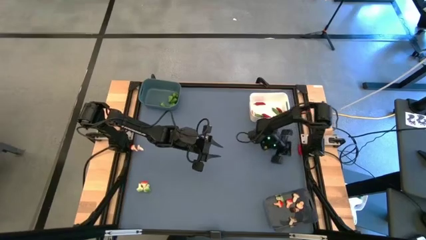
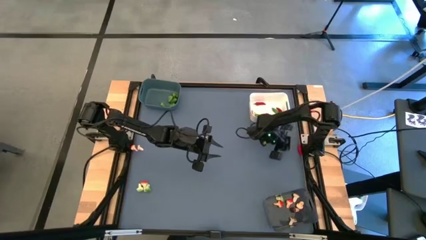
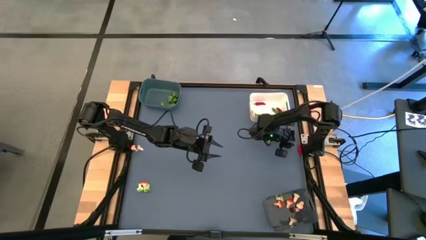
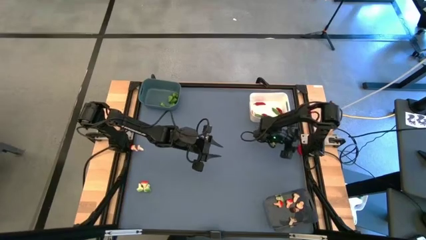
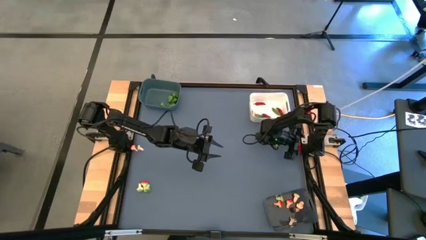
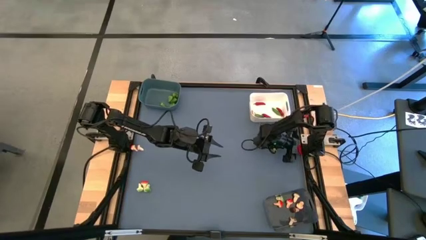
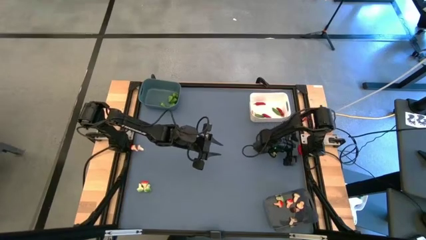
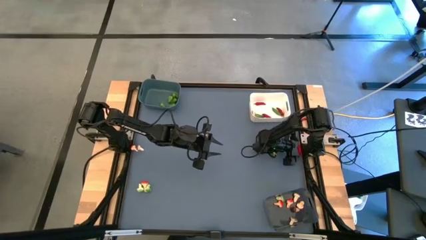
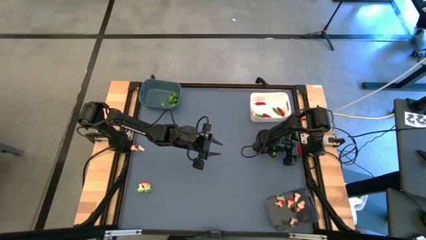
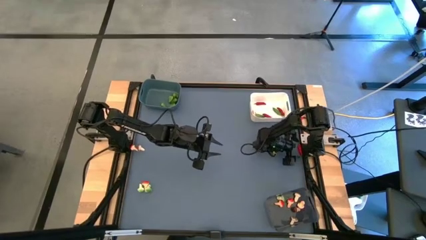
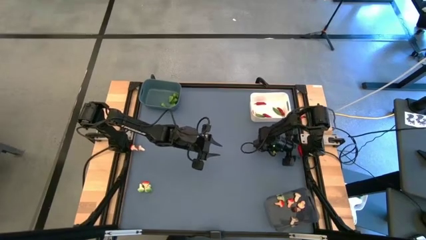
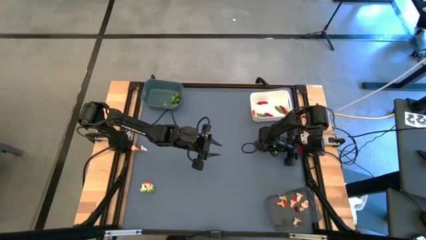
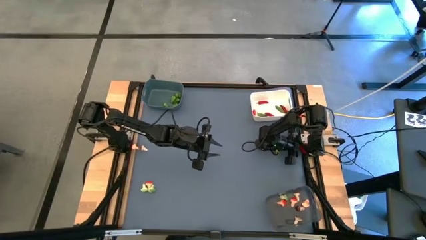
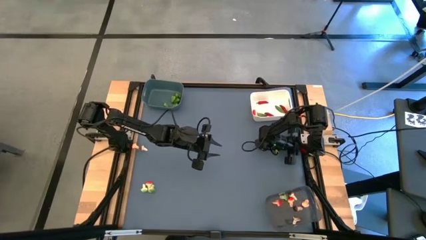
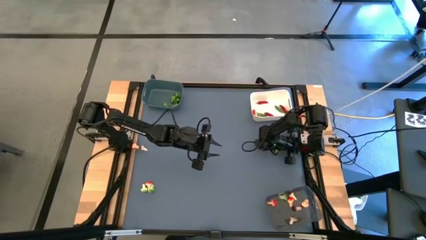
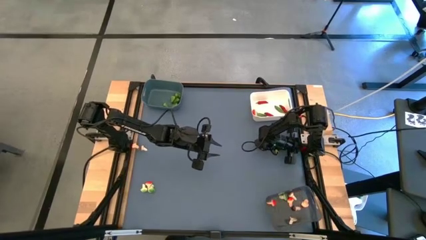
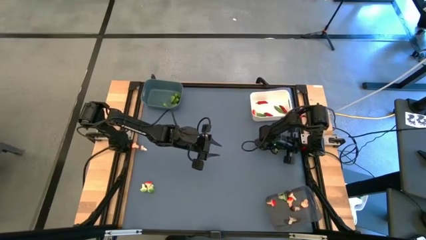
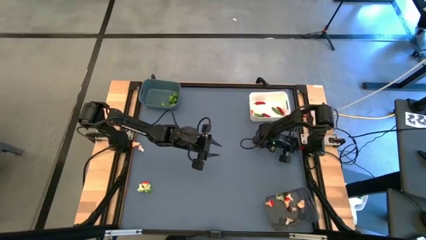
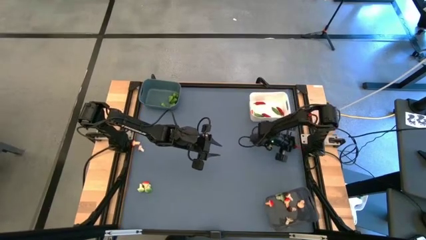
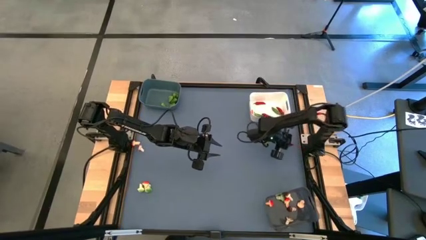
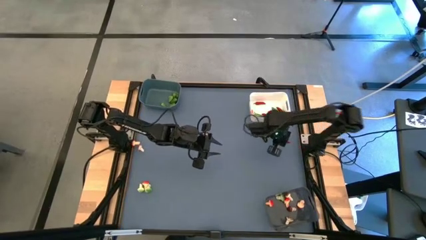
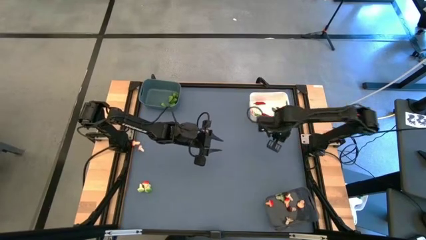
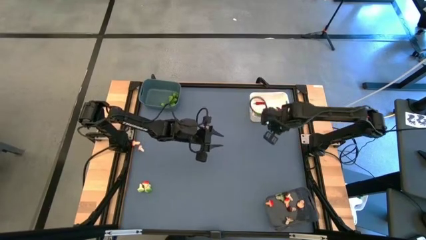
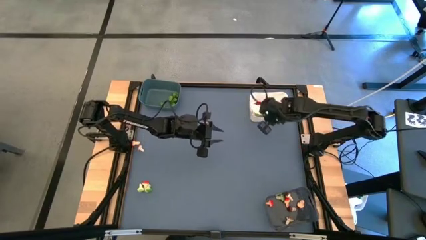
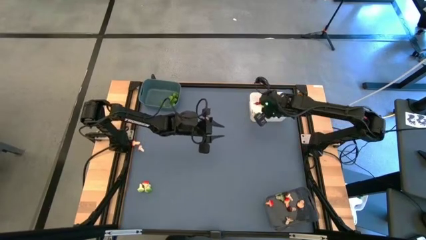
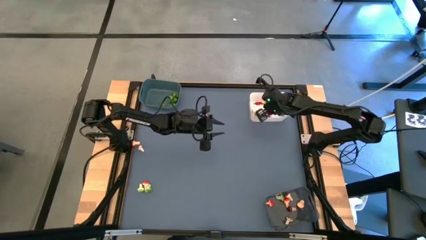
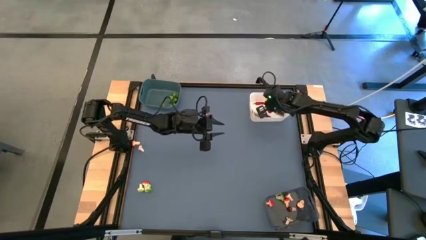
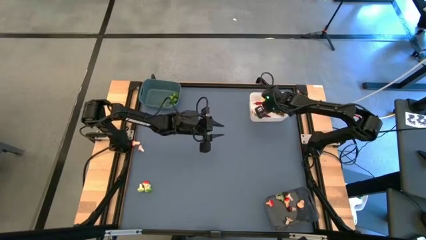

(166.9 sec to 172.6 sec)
Task: Sort produce into baskets
Put the red chili pepper into the white bin

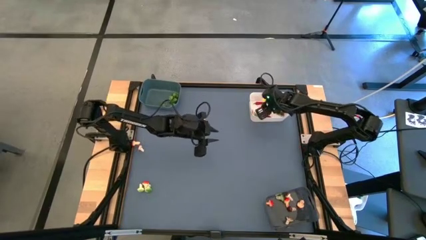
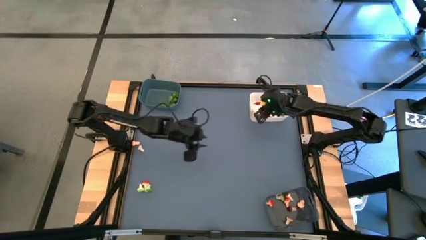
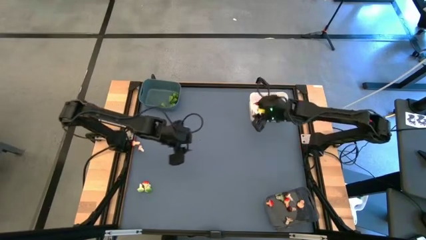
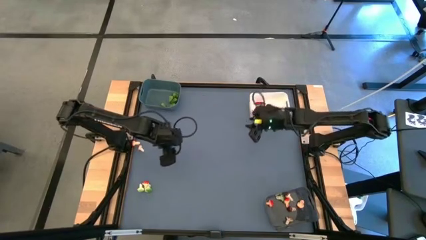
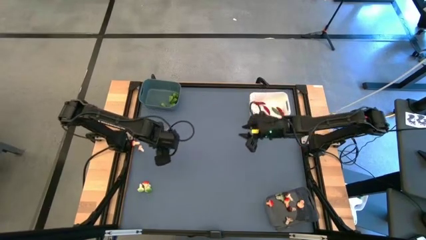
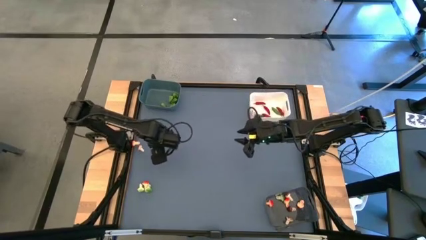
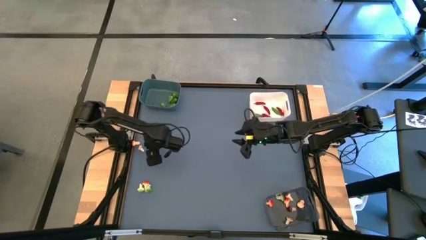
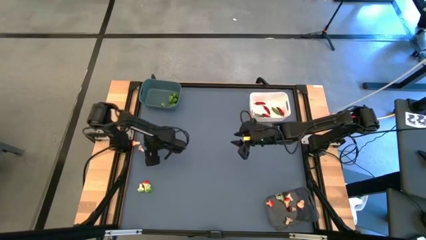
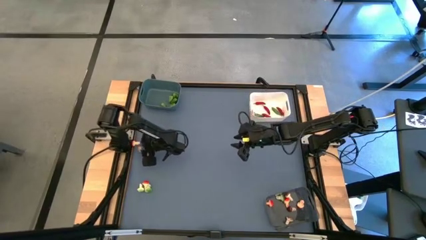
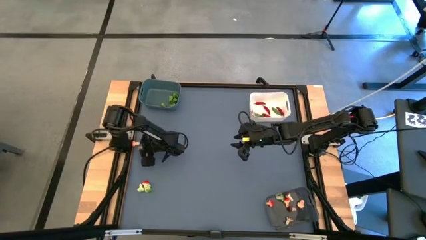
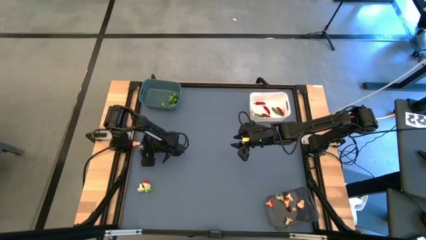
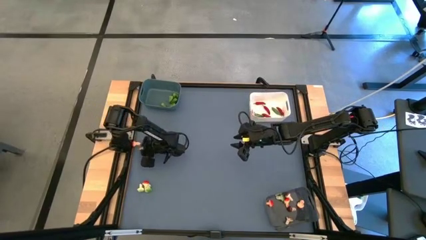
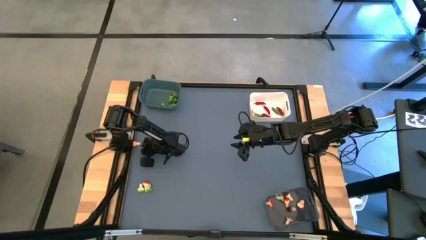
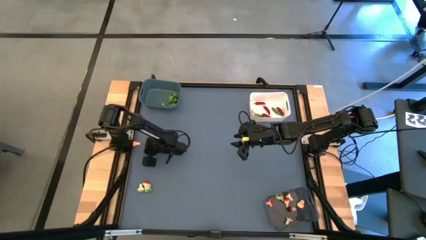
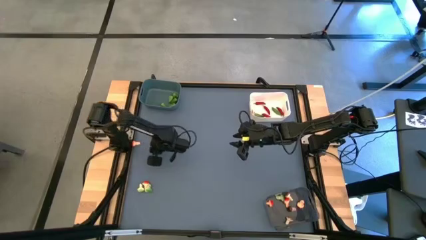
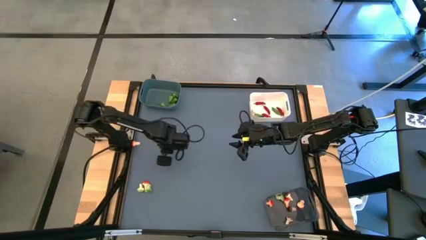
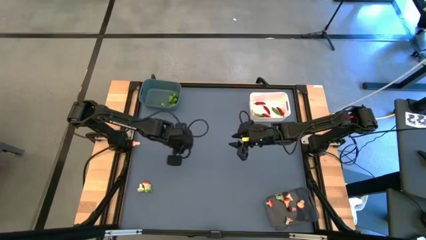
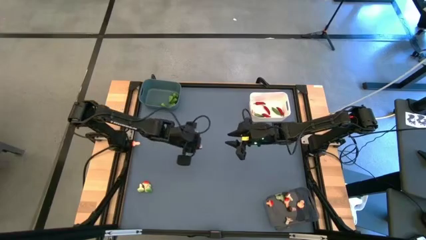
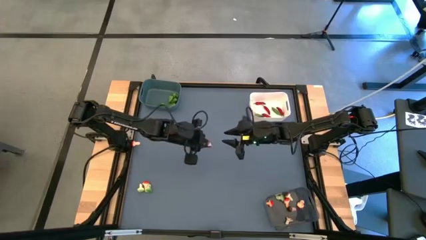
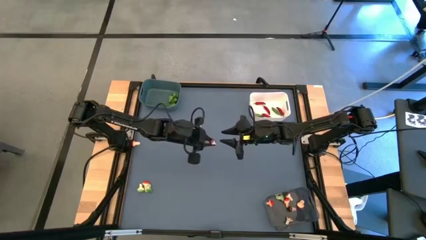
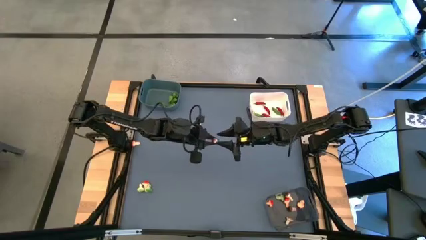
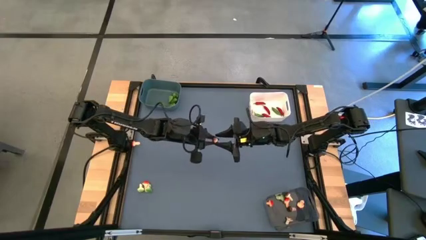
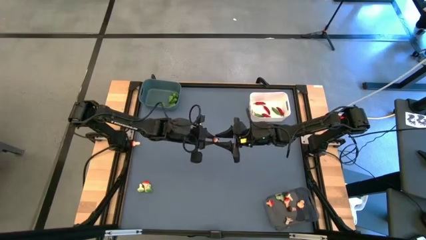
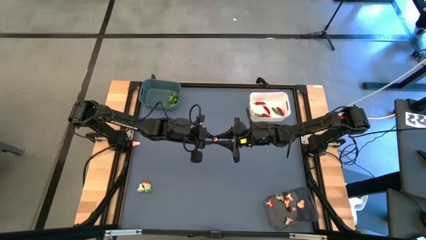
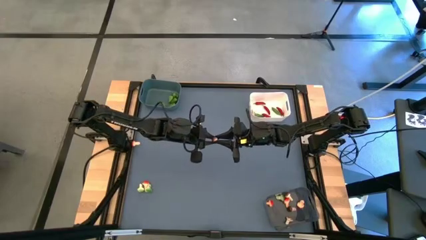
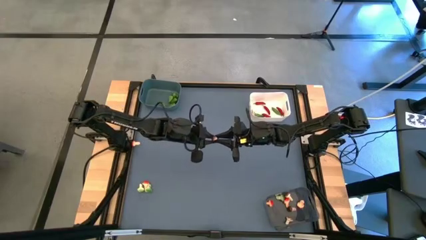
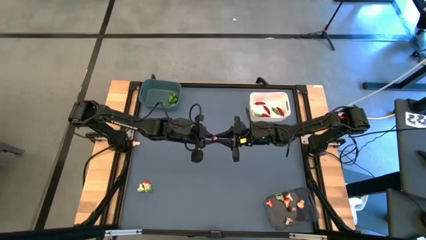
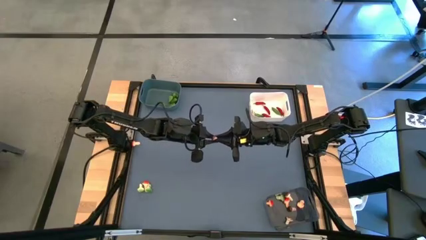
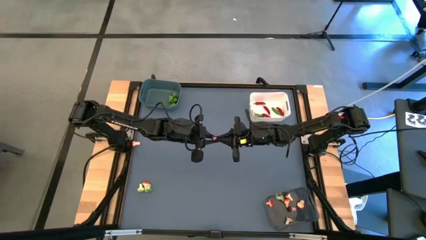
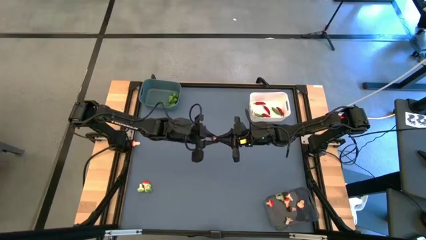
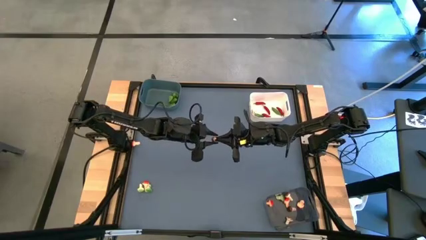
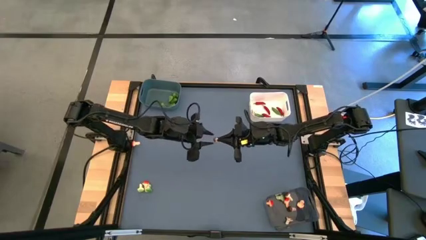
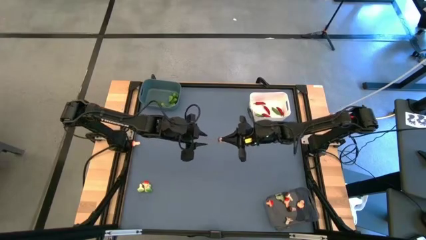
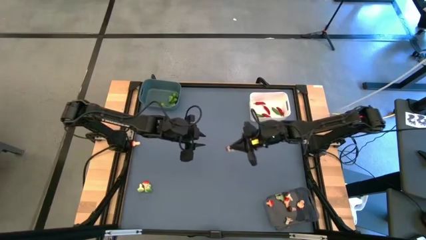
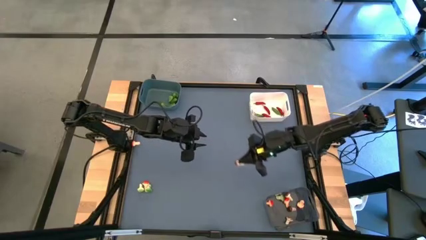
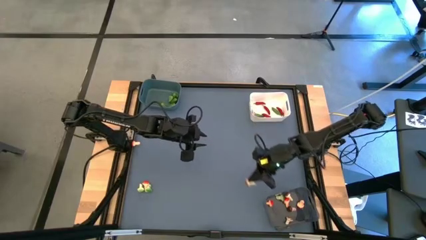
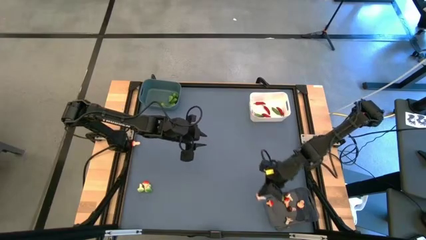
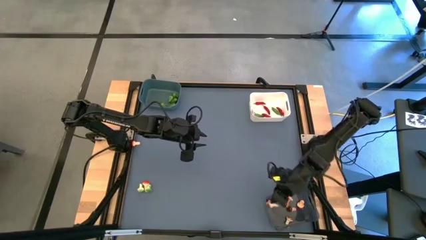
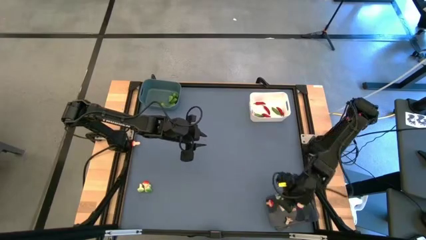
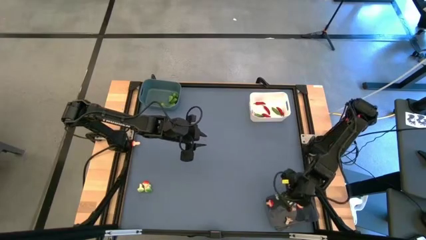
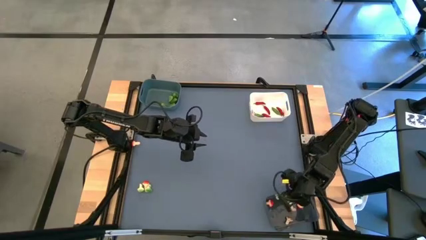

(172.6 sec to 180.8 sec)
Put the brown mushroom into the black bin

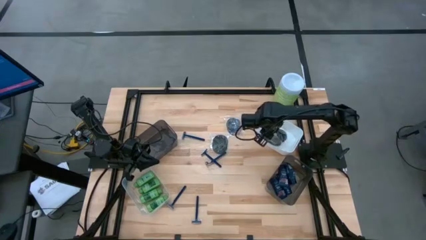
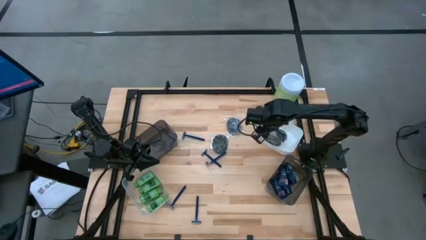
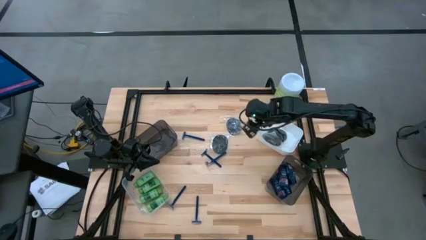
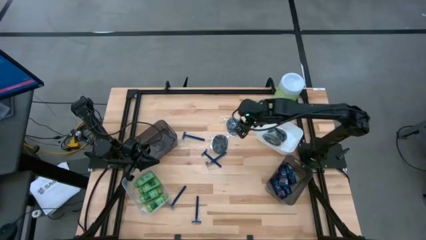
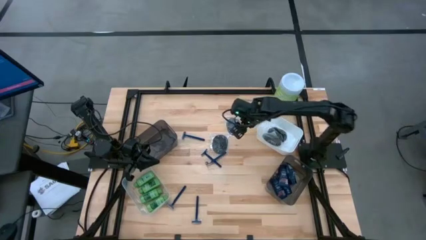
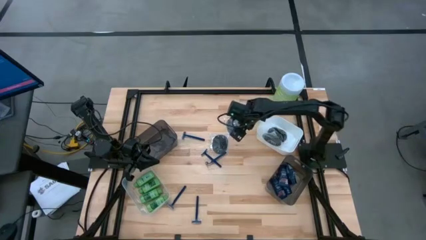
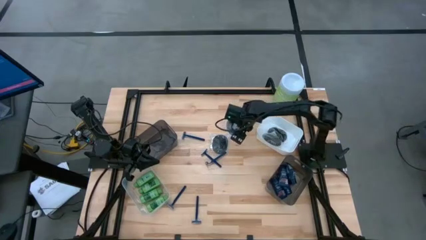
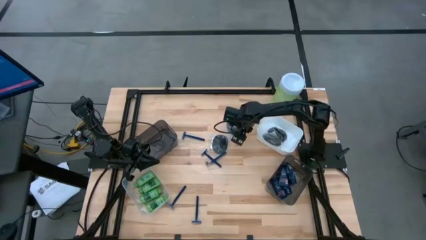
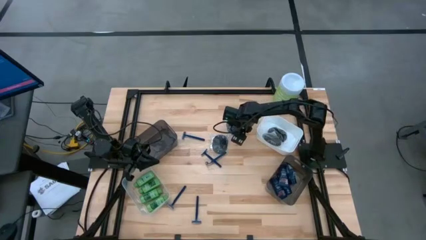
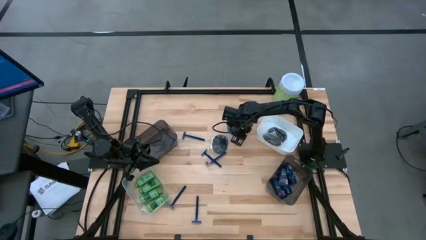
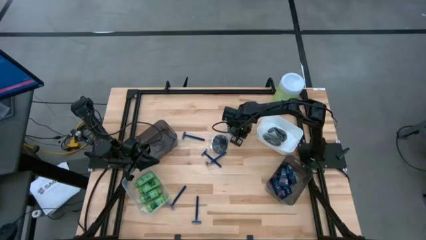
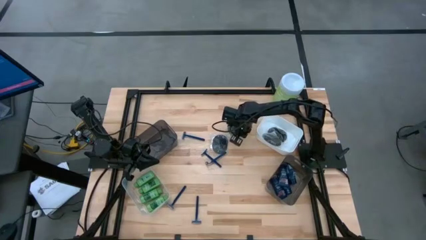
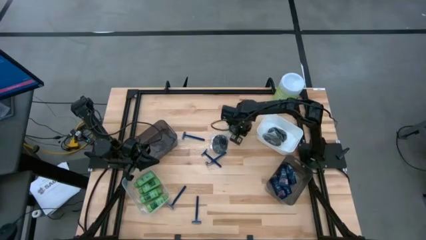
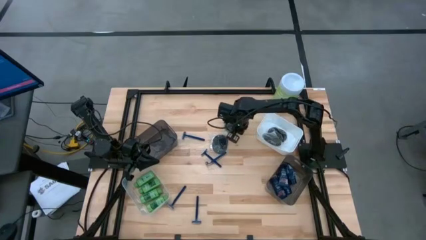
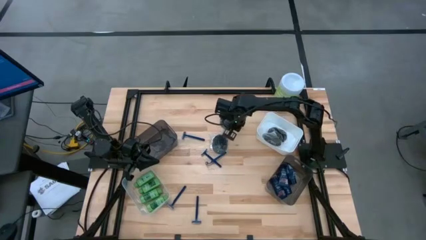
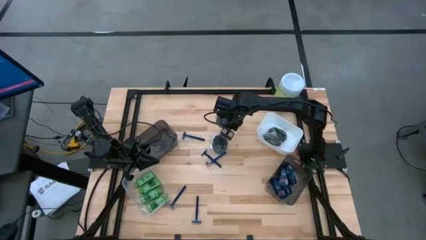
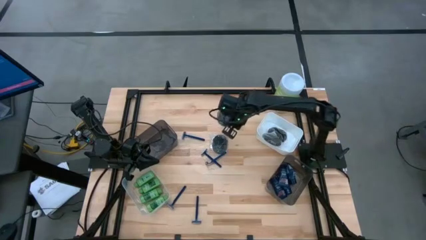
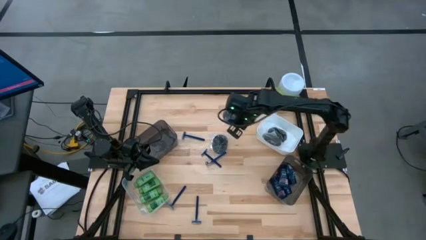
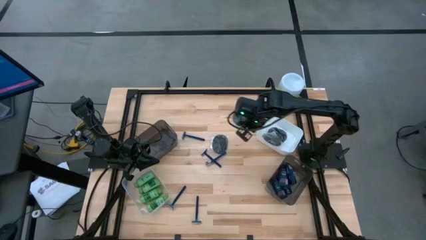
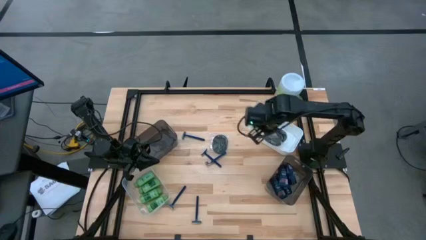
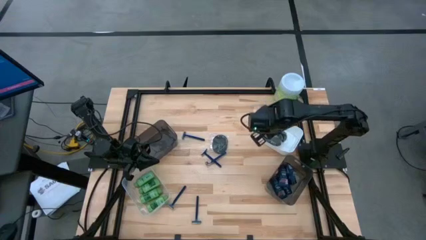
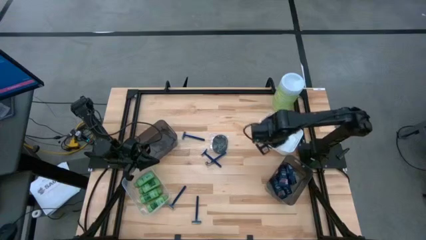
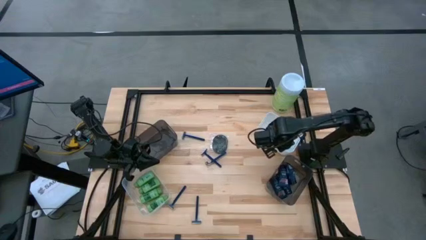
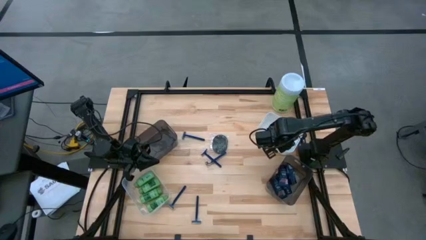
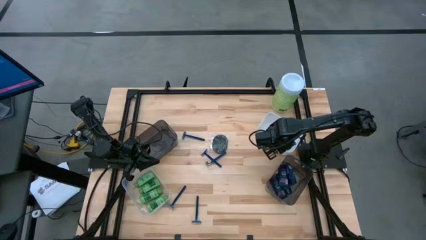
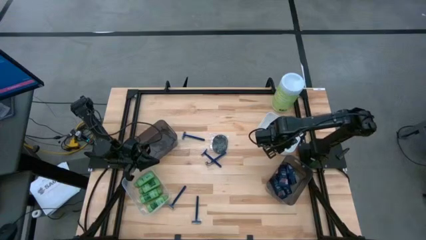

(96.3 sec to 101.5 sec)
Task: Pick & Place Travel size toiletries
Put the black hairbrush into the white bin
